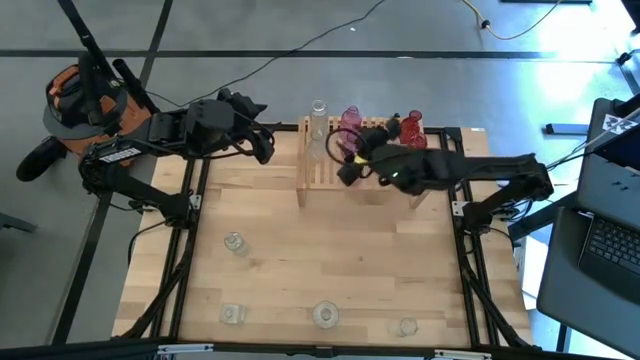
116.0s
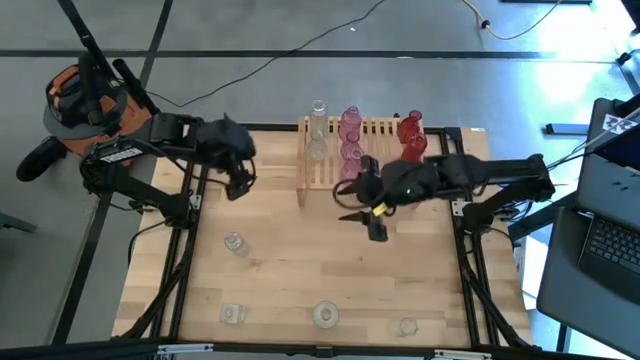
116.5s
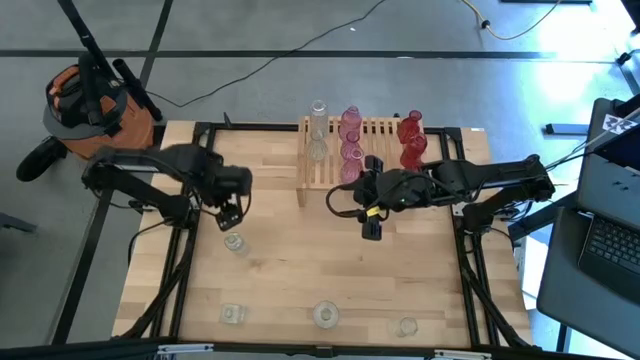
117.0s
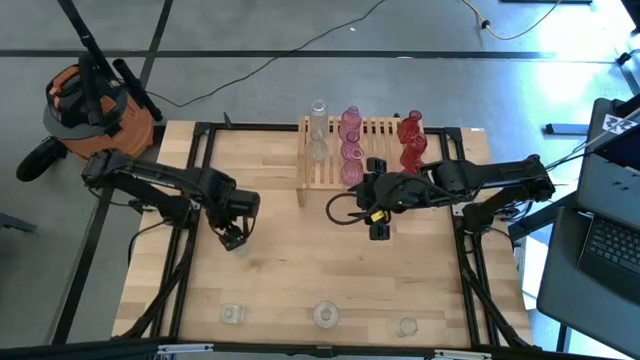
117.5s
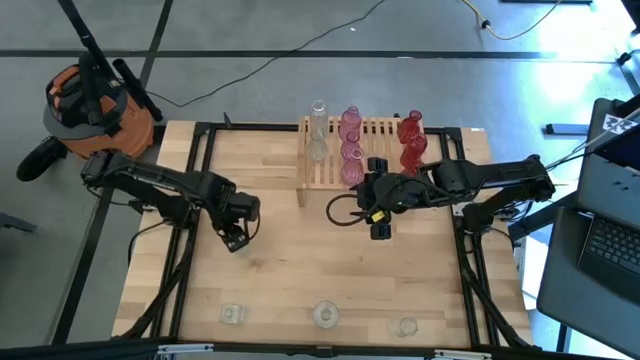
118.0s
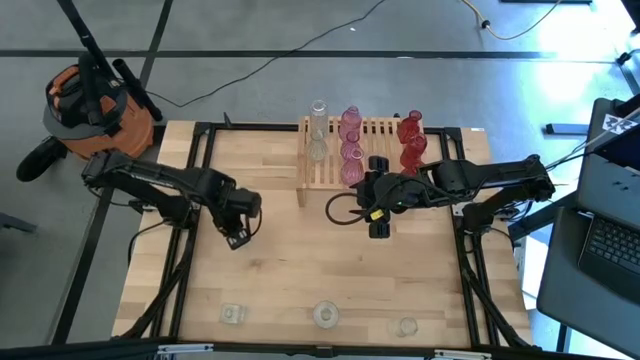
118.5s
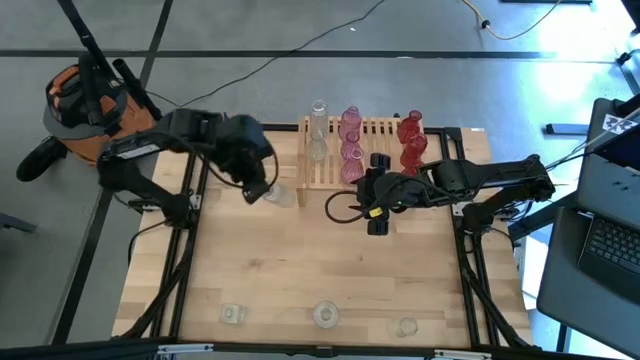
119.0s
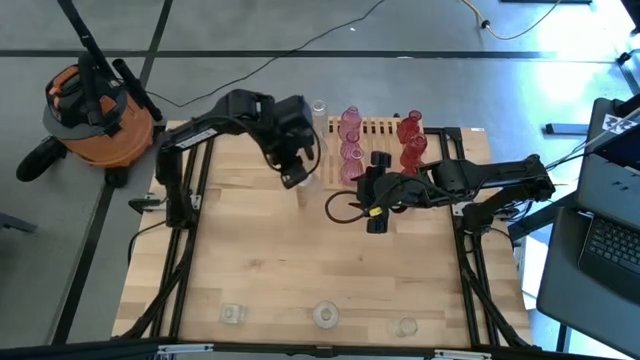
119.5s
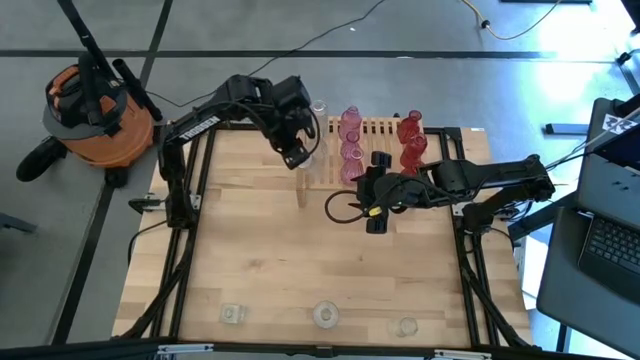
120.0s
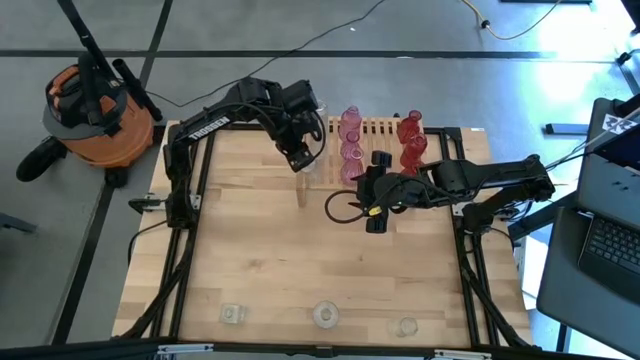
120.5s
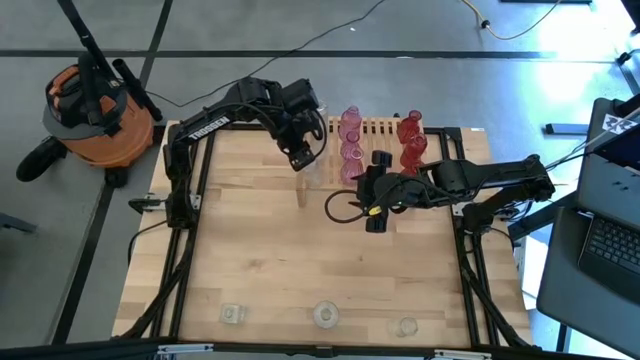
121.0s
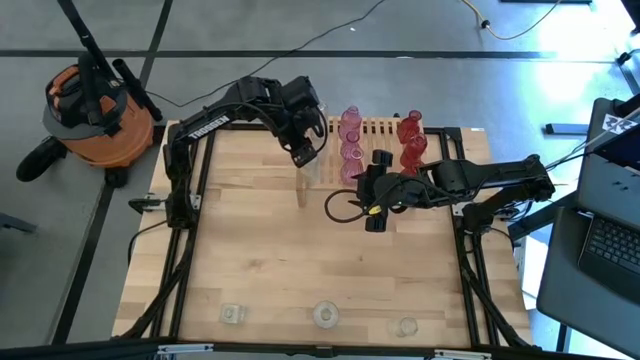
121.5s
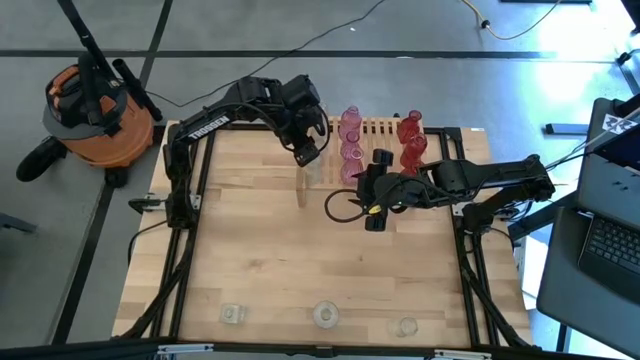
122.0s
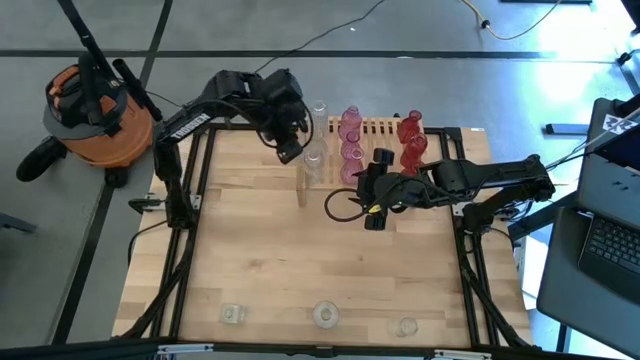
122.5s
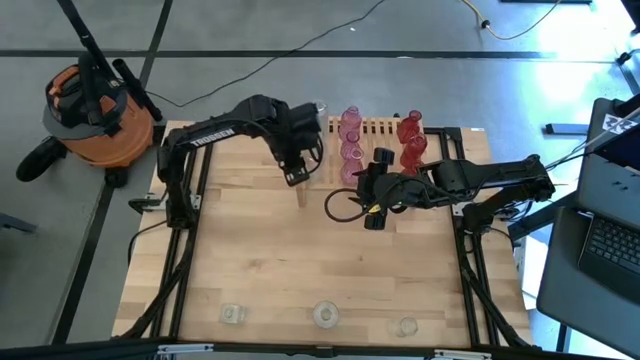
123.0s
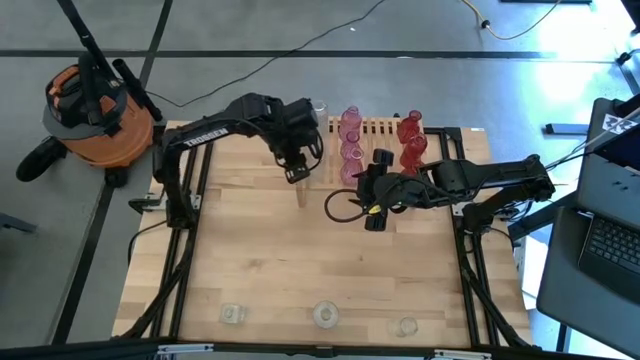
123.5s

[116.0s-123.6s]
Task: sort vases onto shelf
Put the transparent vase on the shelf aligned with the other transparent vase

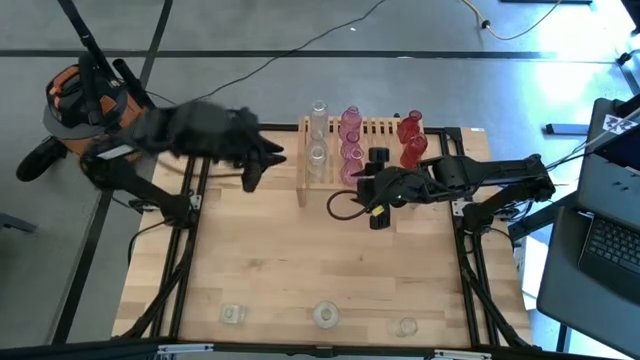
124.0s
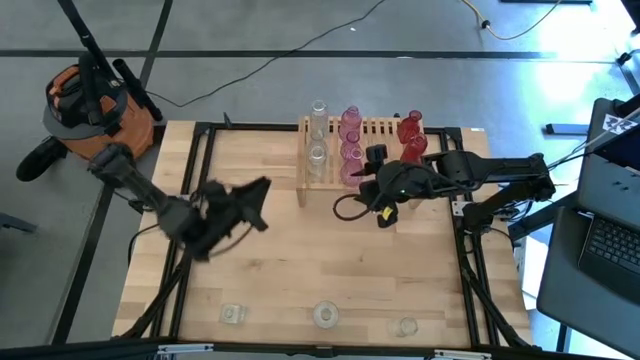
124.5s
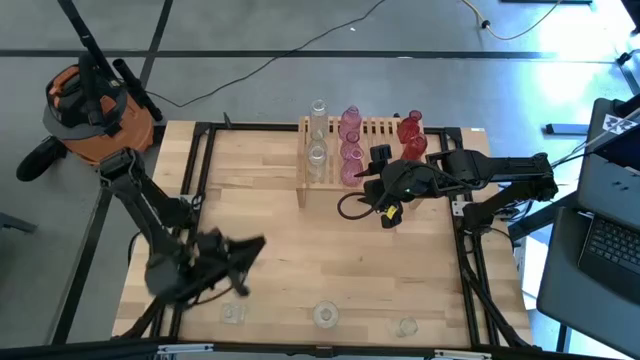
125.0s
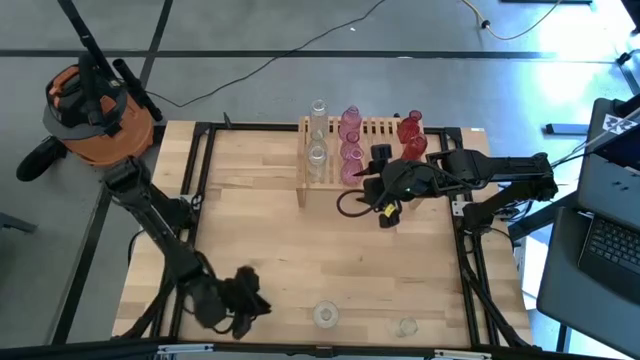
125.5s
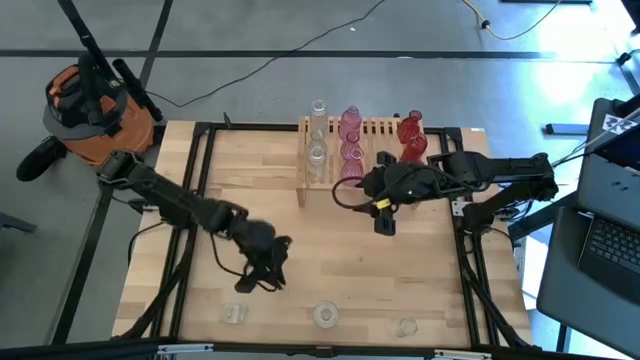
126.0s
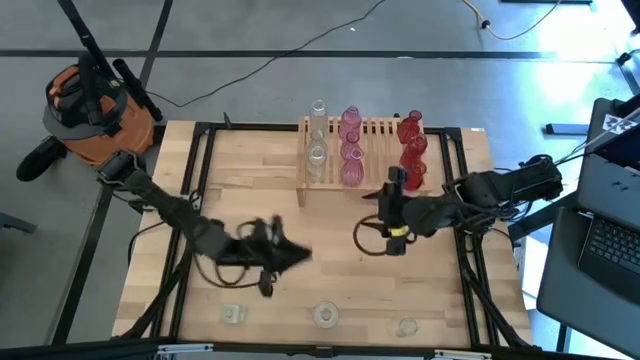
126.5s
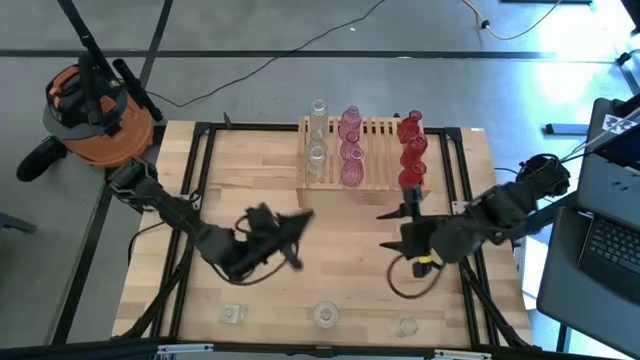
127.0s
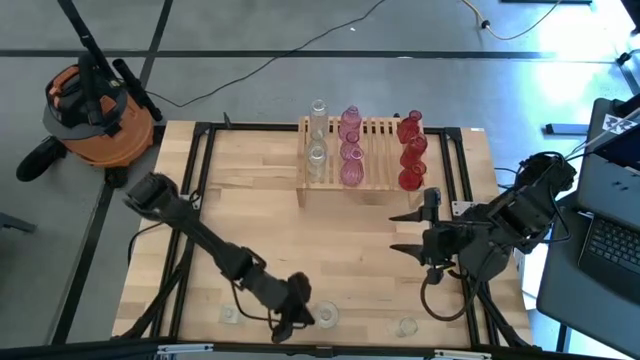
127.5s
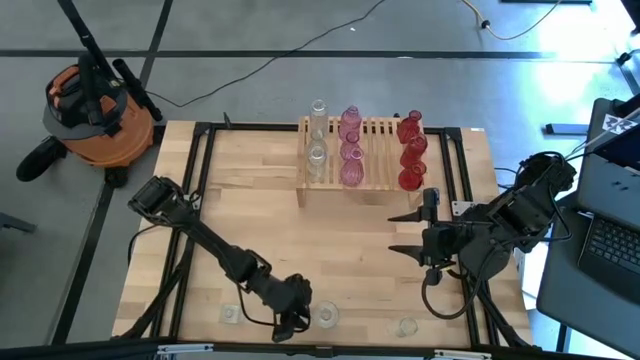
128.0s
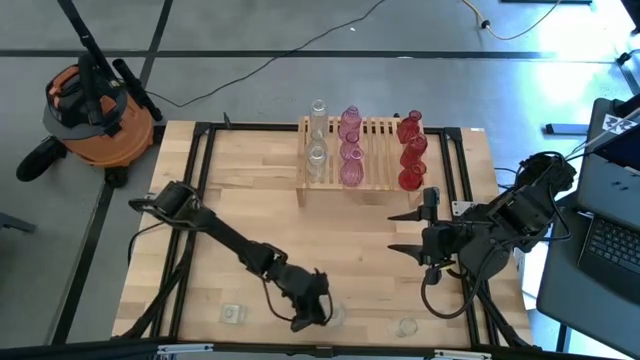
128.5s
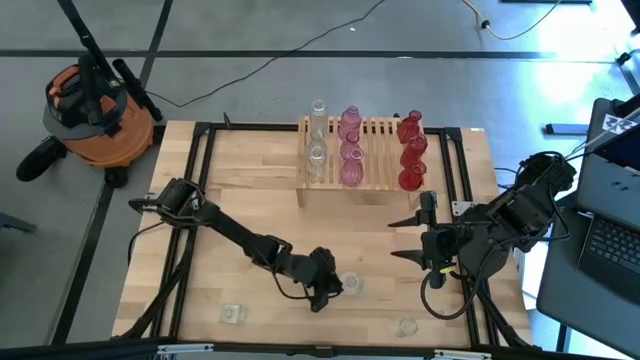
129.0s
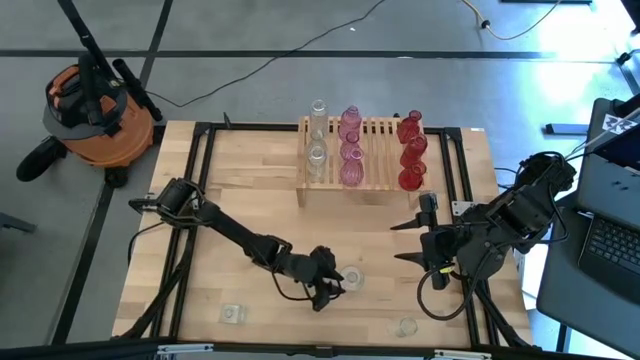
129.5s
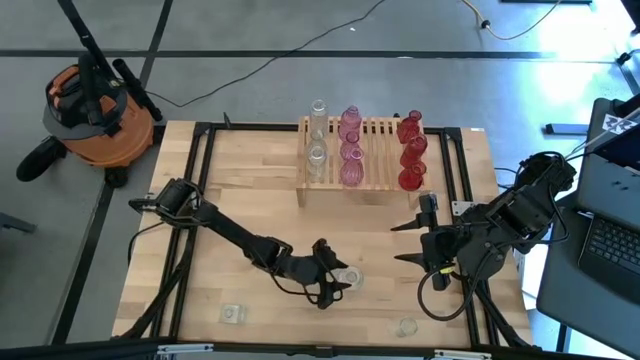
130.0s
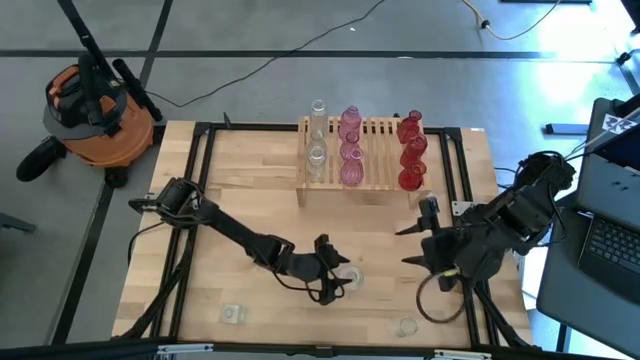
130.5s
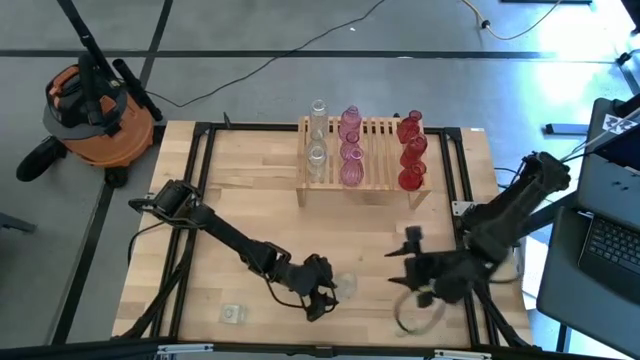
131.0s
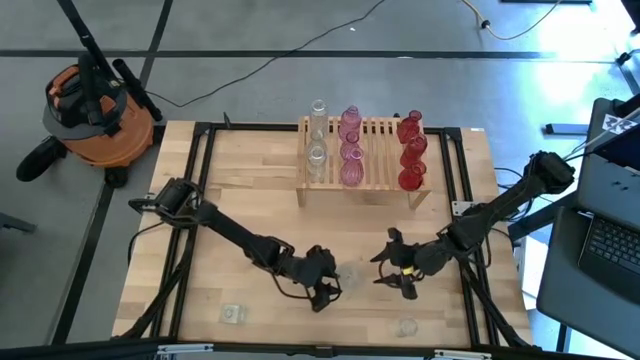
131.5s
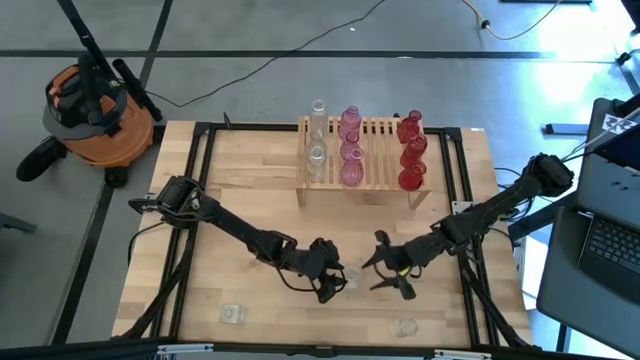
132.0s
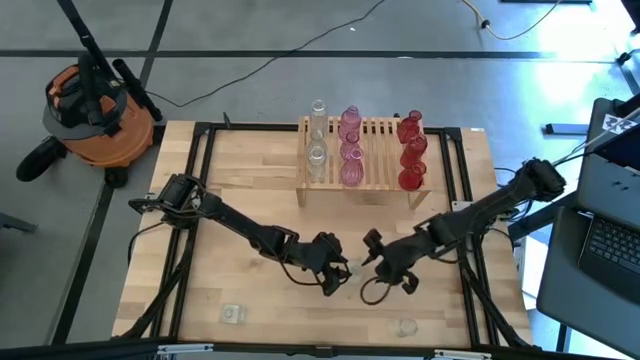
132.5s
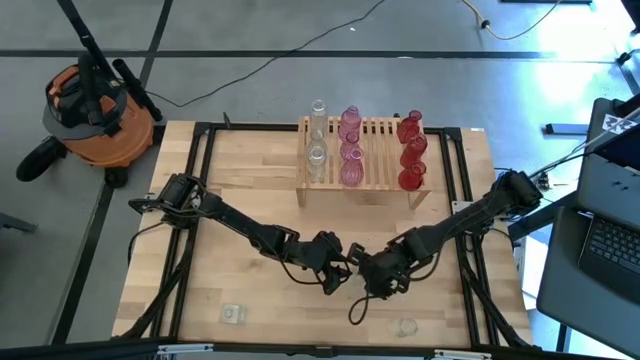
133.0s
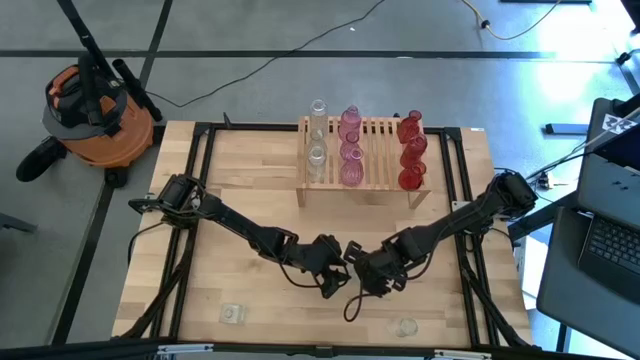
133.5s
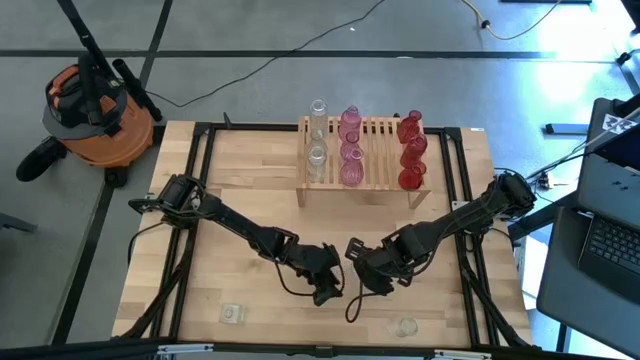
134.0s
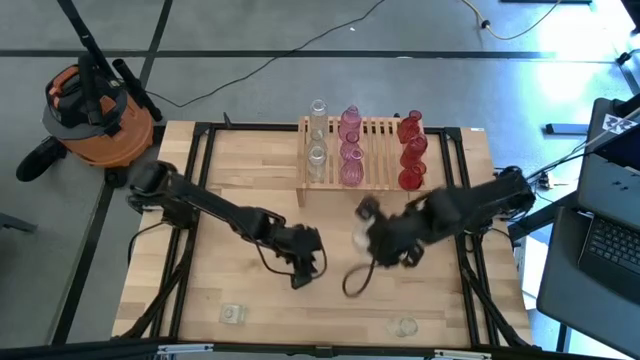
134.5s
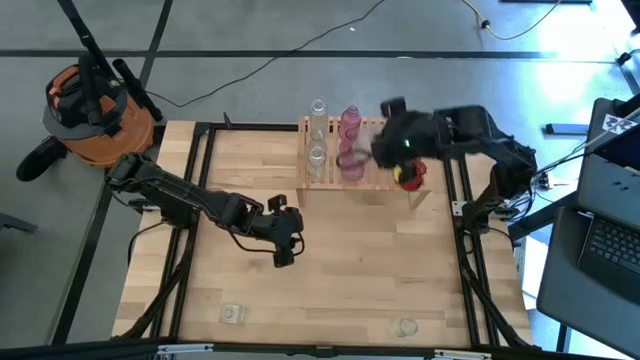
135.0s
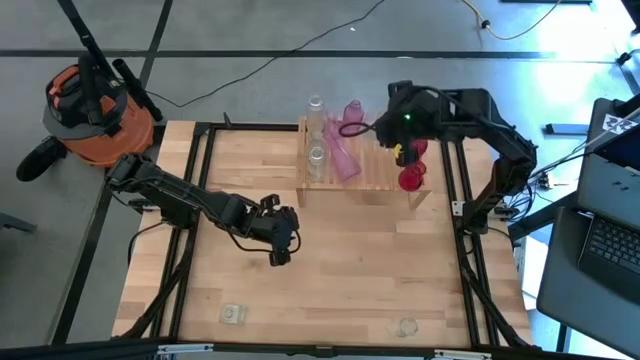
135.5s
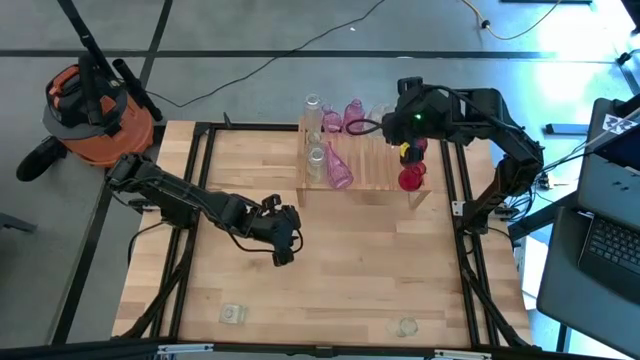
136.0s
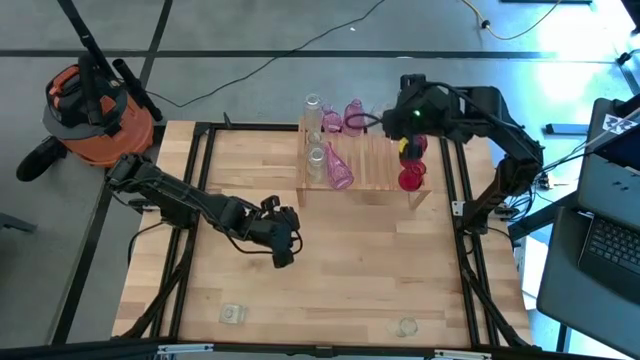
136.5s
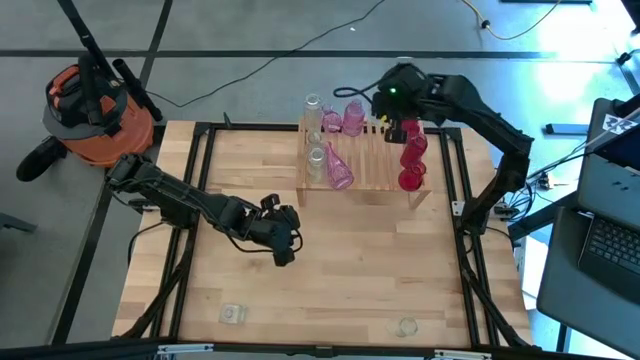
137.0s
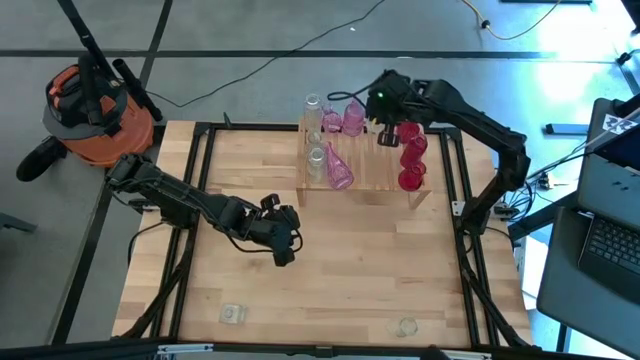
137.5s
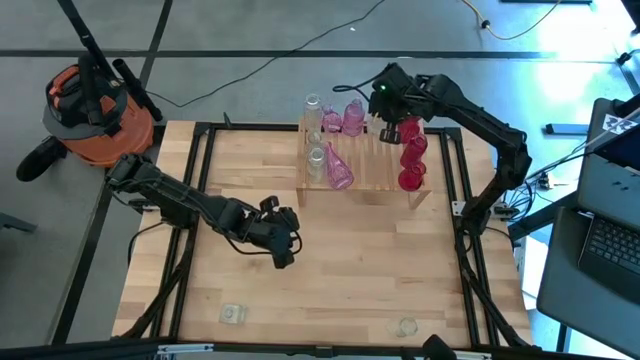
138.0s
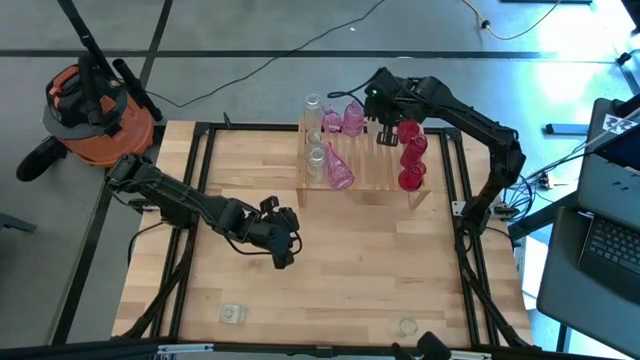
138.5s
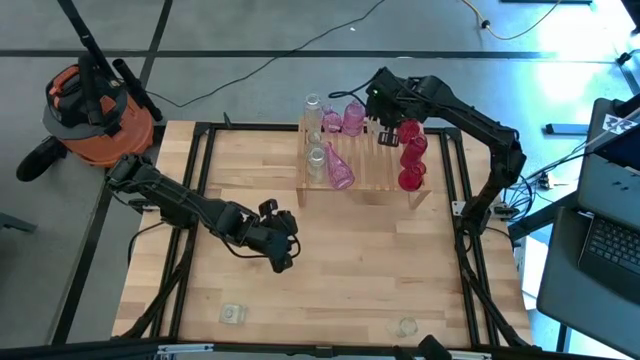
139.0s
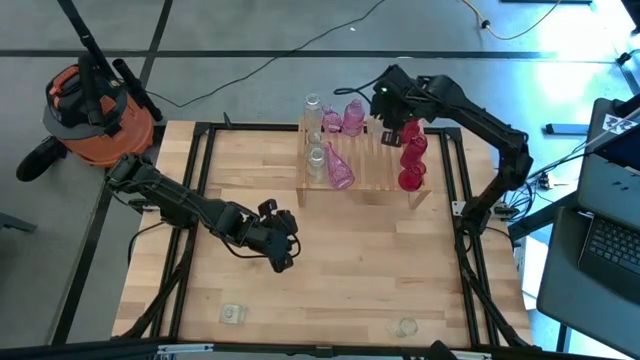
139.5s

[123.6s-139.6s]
Put the transparent vase on the shelf
